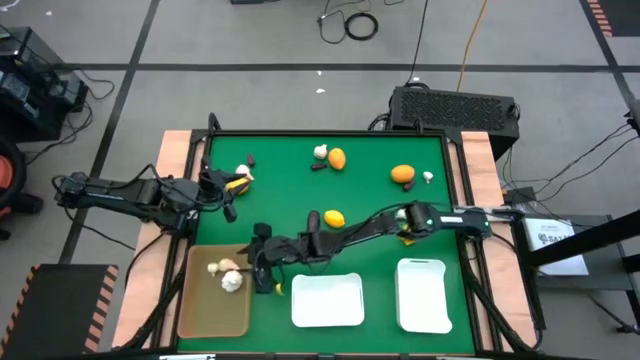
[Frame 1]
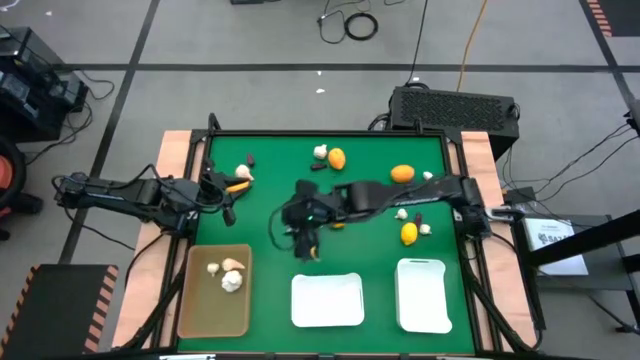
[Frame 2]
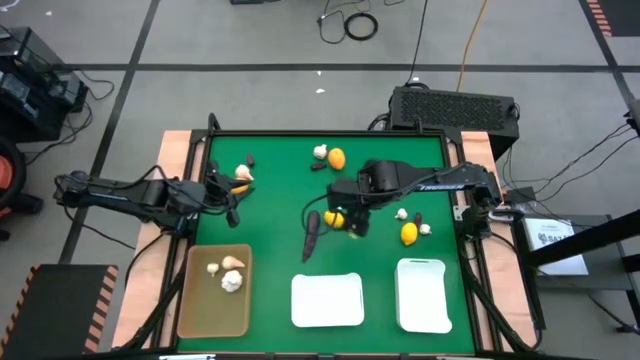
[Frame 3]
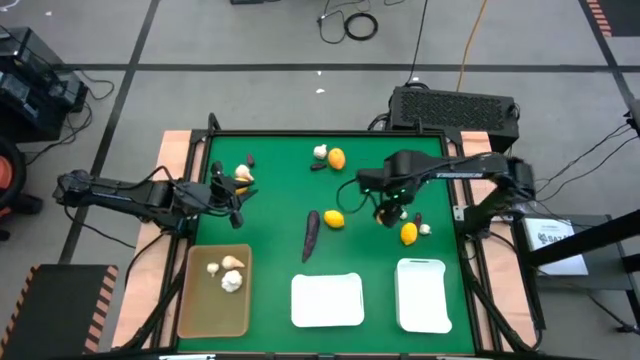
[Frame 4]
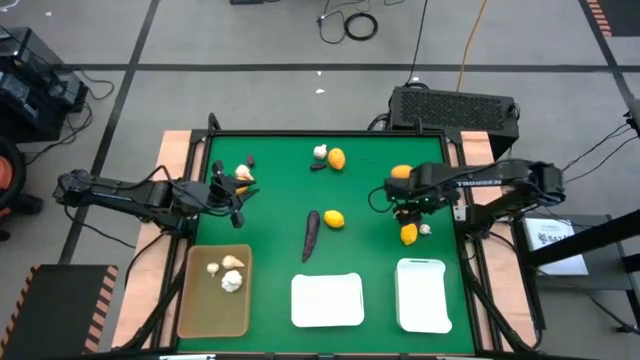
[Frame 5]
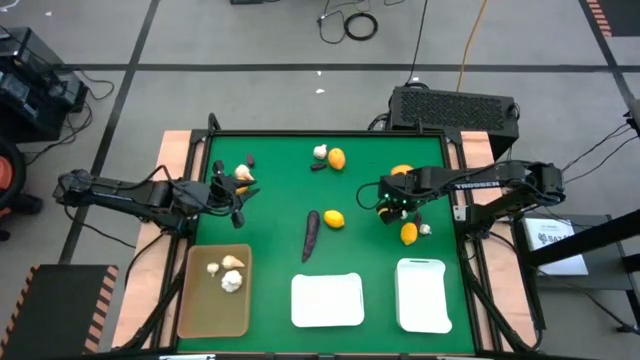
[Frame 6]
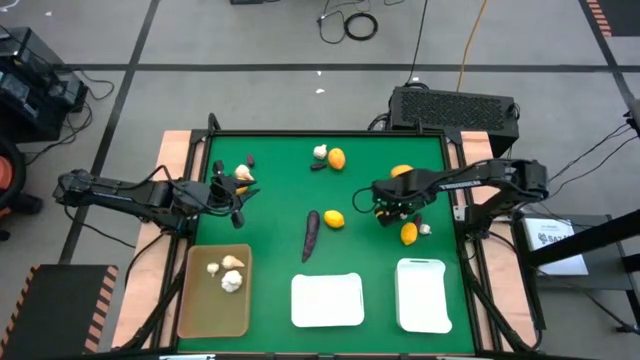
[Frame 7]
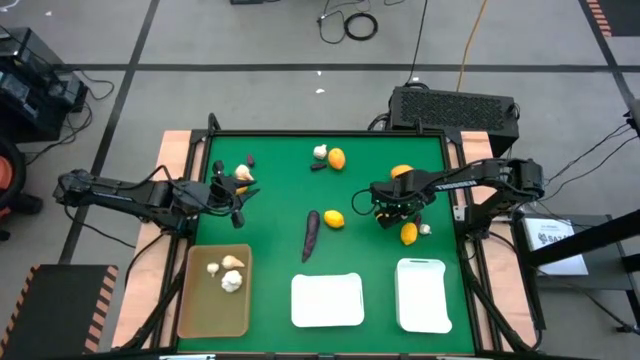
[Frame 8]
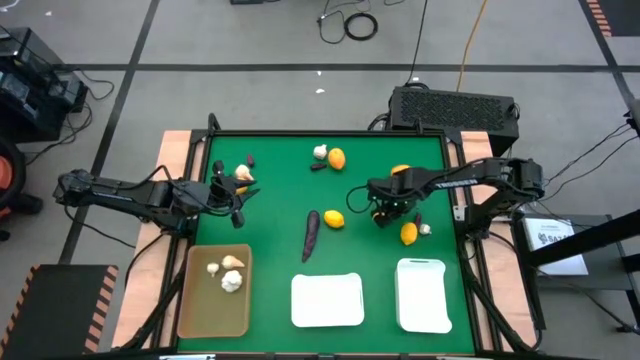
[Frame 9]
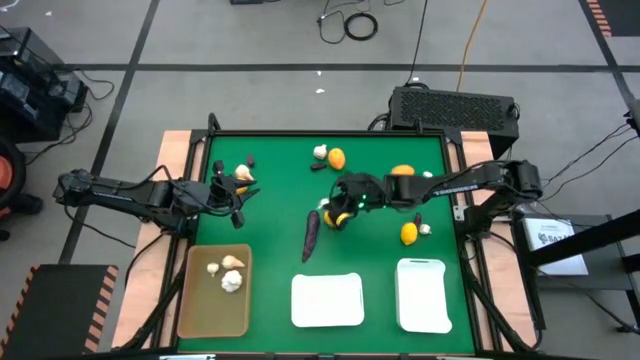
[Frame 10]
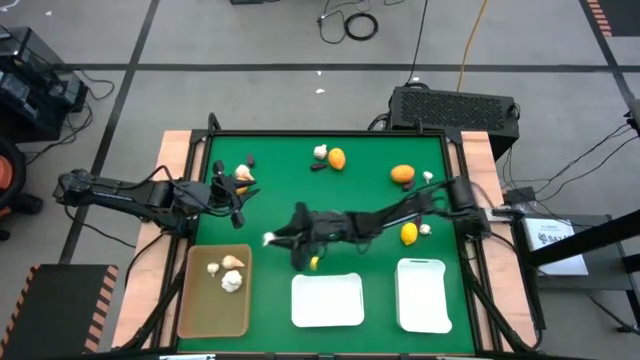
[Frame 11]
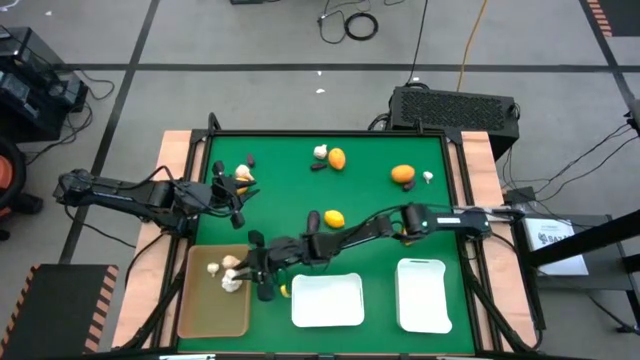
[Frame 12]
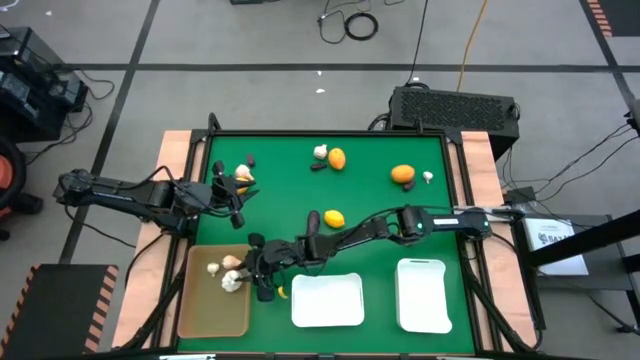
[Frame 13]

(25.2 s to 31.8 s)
Task: Sort produce into baskets
Put the garlic into the orange bin

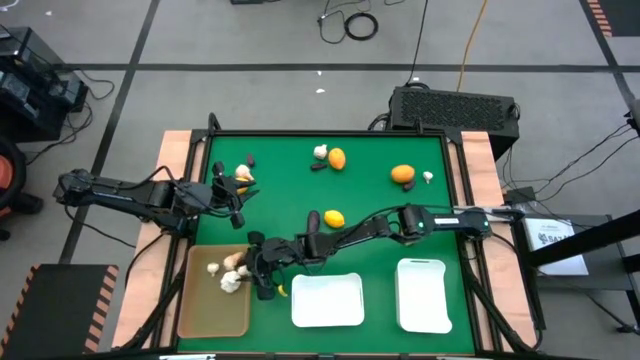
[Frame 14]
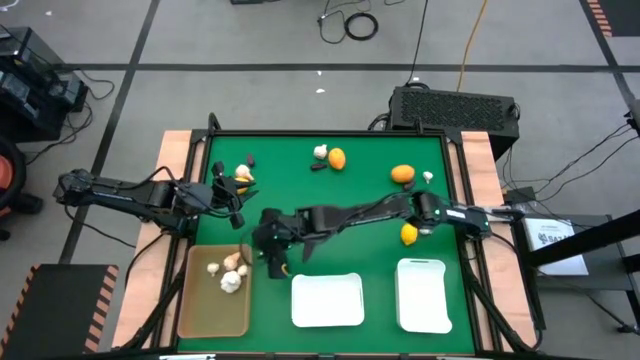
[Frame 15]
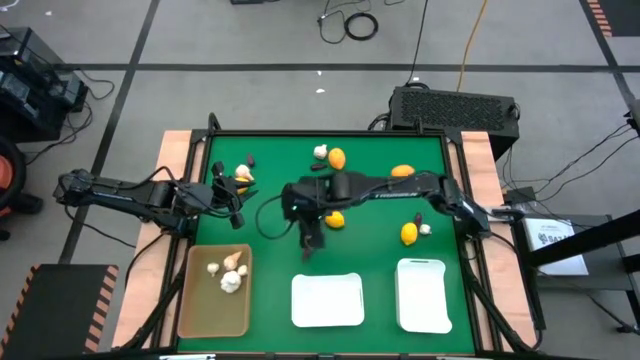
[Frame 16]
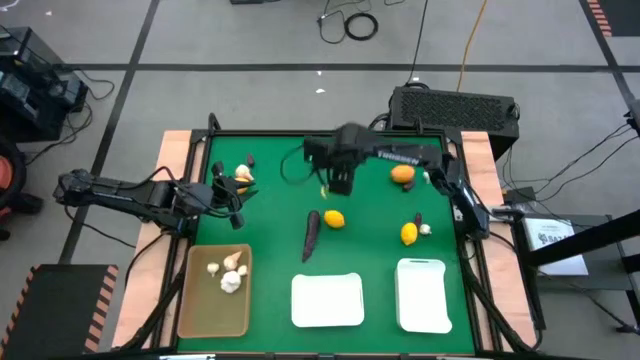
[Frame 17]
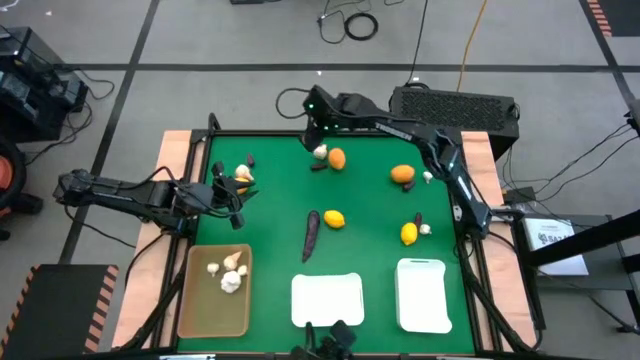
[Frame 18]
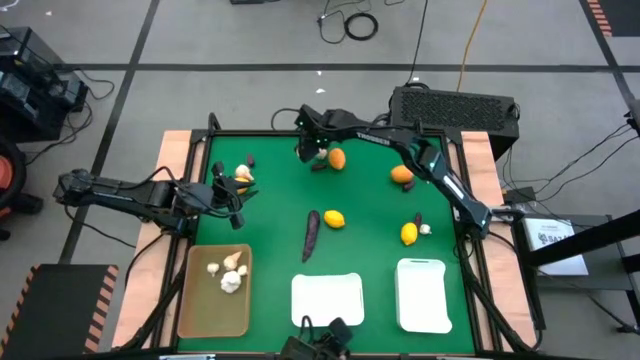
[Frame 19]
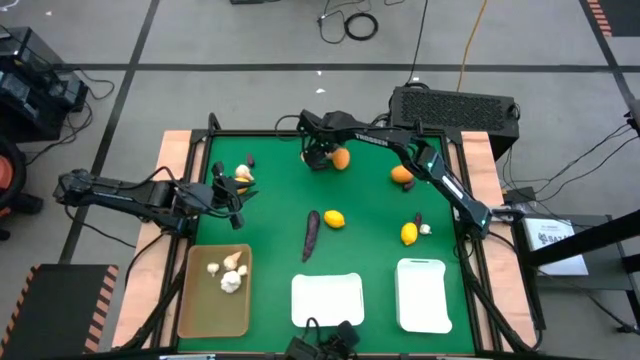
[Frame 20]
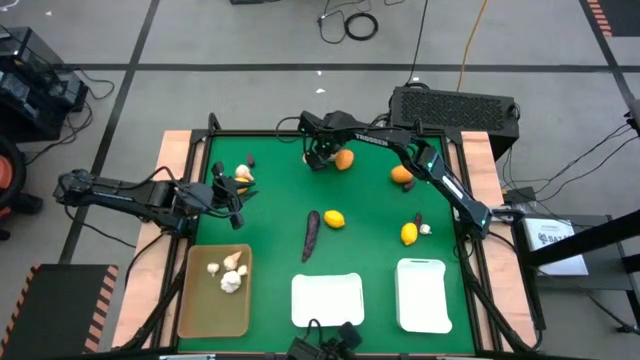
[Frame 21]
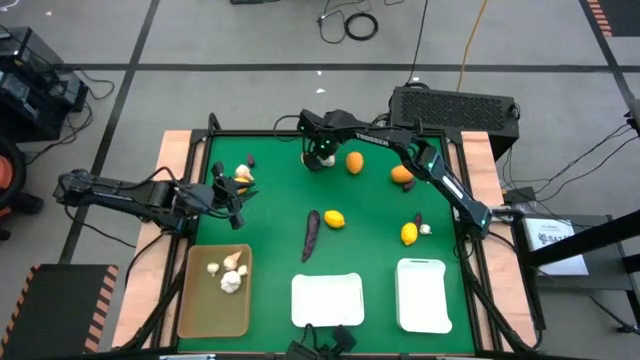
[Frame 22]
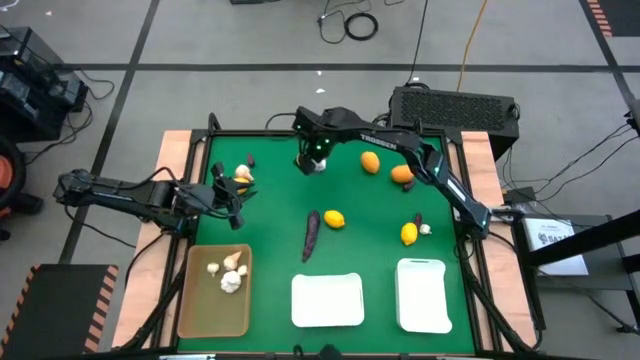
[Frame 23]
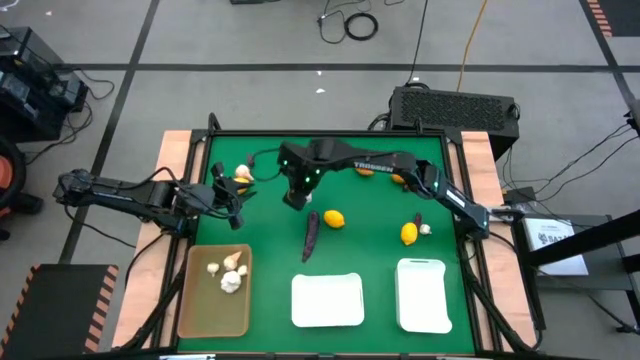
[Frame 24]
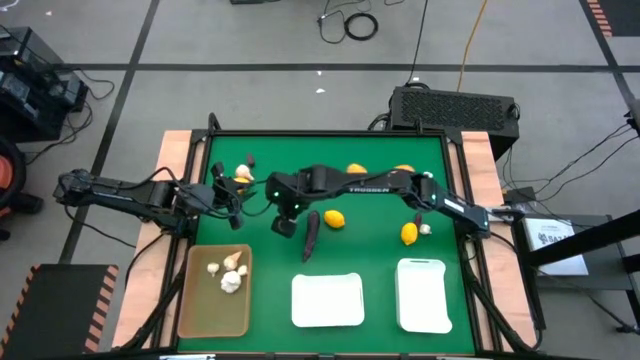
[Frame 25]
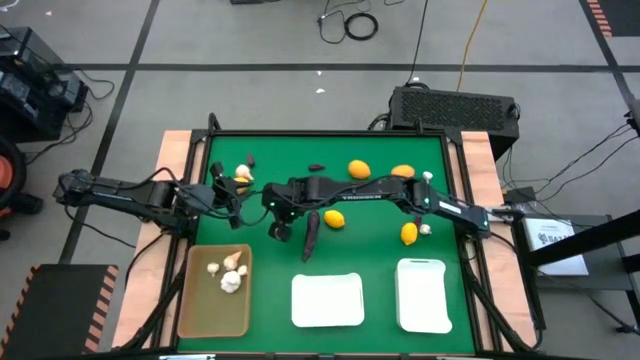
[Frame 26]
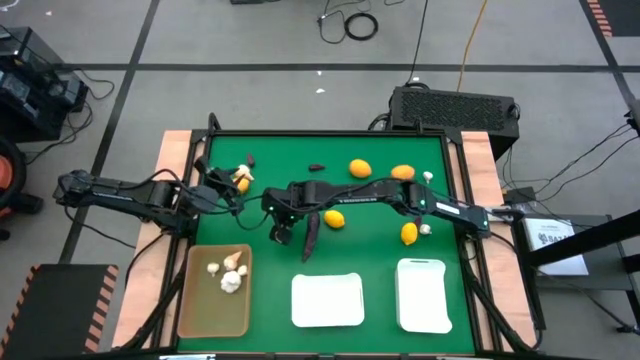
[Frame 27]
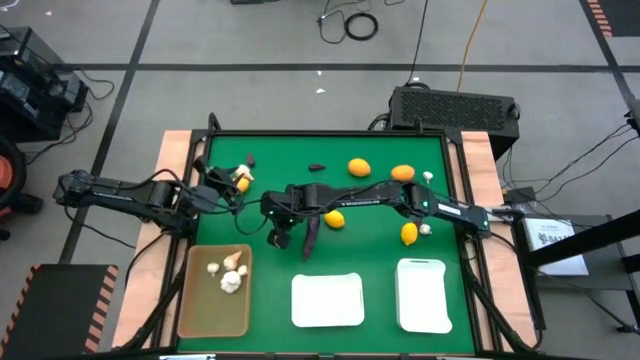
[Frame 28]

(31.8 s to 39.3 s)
Put the garlic into the orange bin

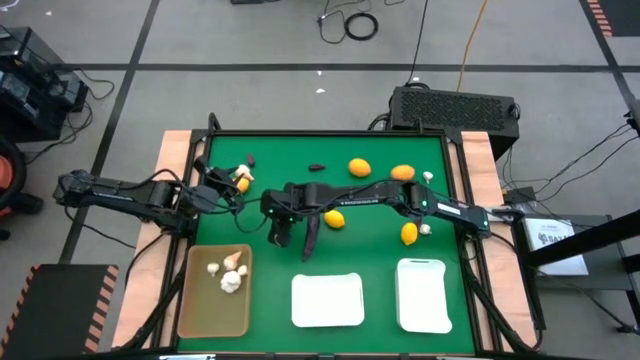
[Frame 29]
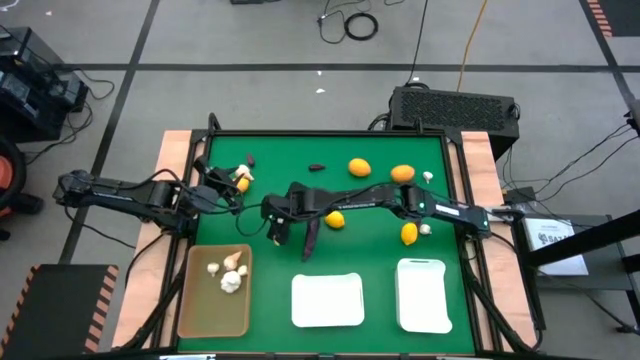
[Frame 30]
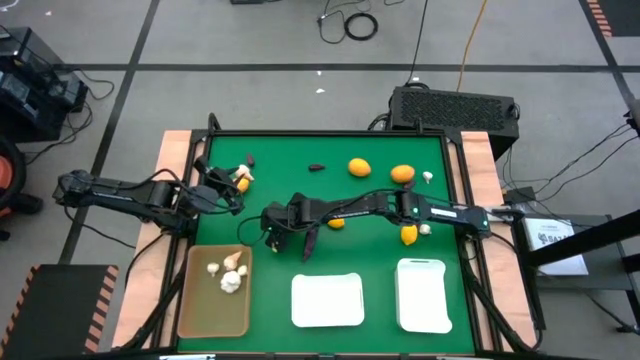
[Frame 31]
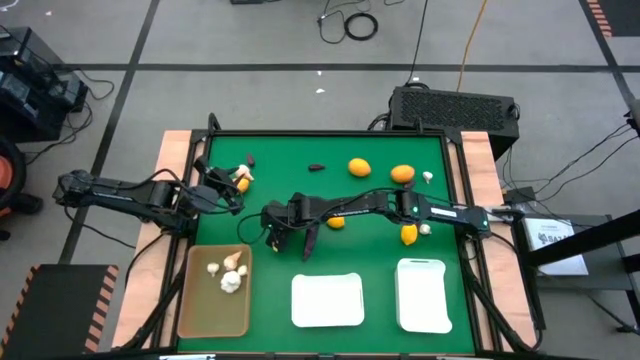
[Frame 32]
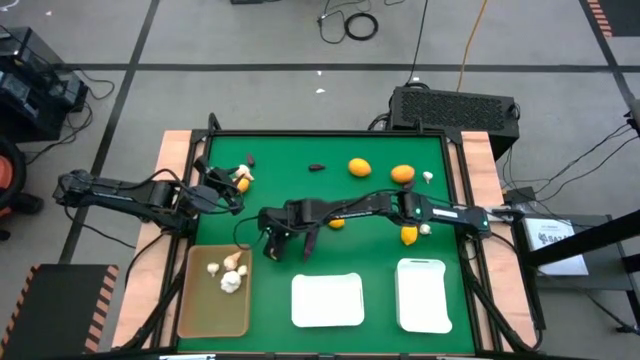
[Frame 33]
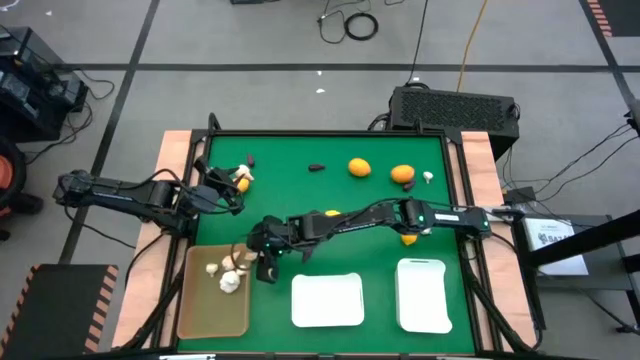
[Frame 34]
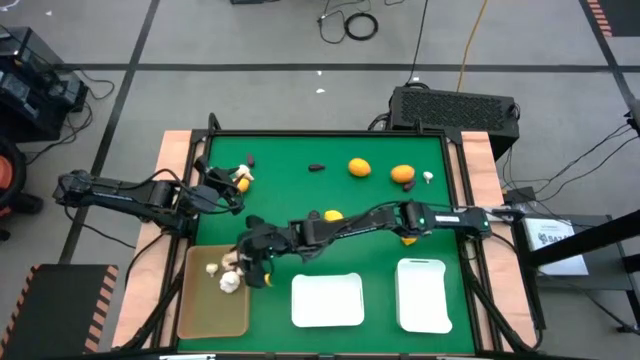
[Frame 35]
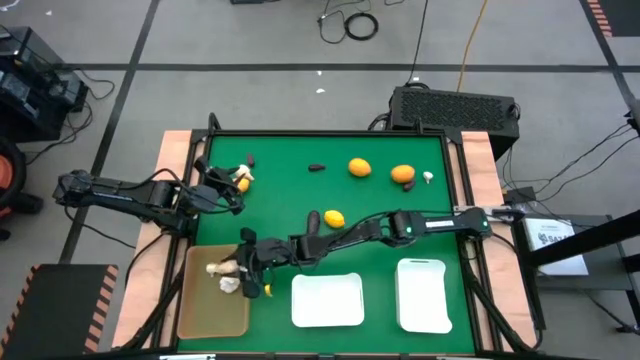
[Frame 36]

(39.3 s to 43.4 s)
Put the garlic into the orange bin

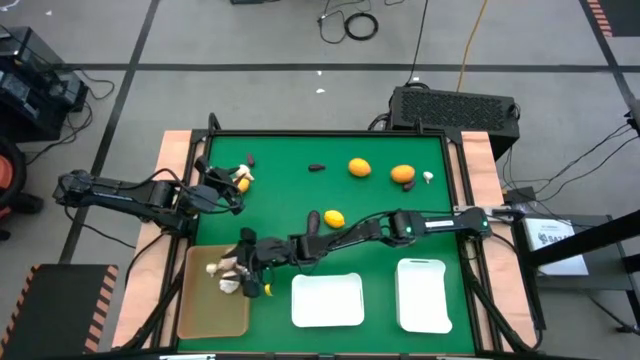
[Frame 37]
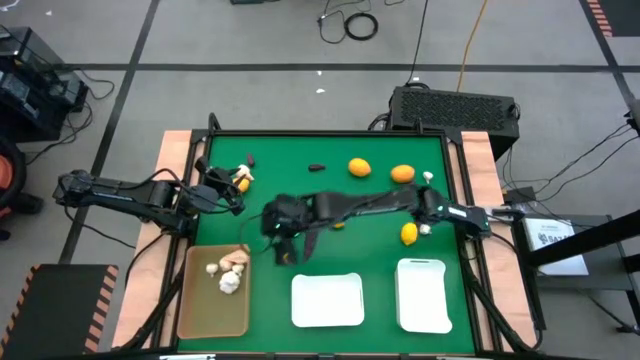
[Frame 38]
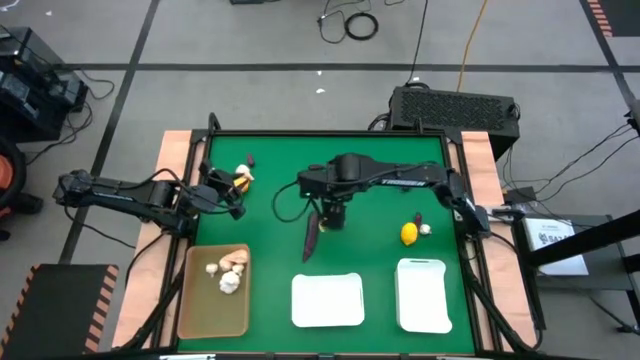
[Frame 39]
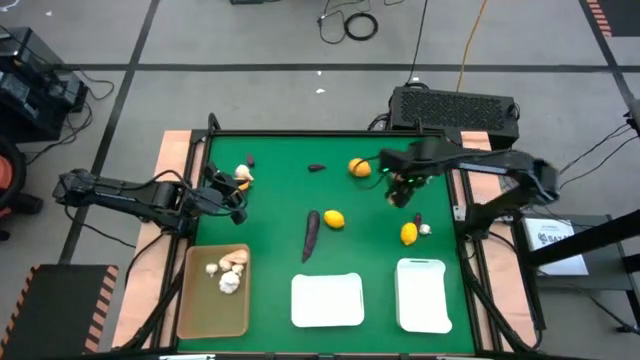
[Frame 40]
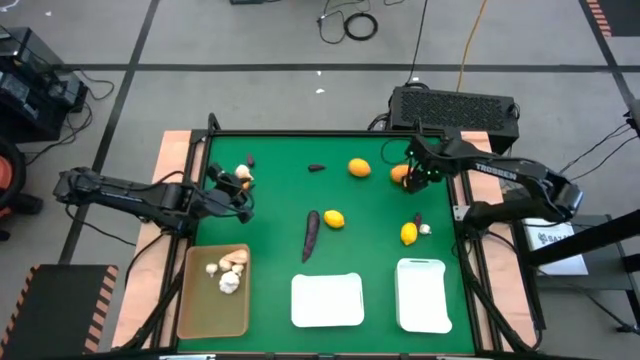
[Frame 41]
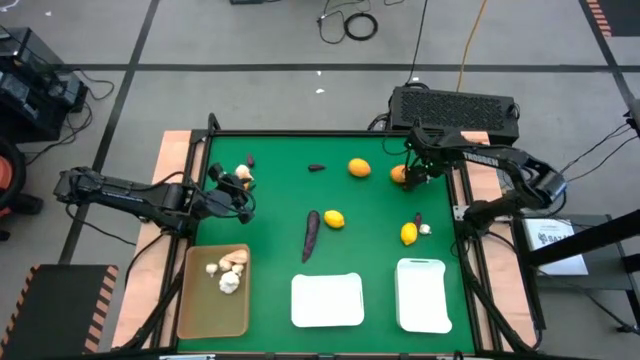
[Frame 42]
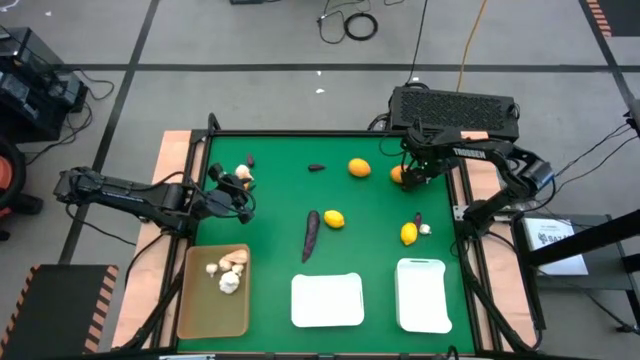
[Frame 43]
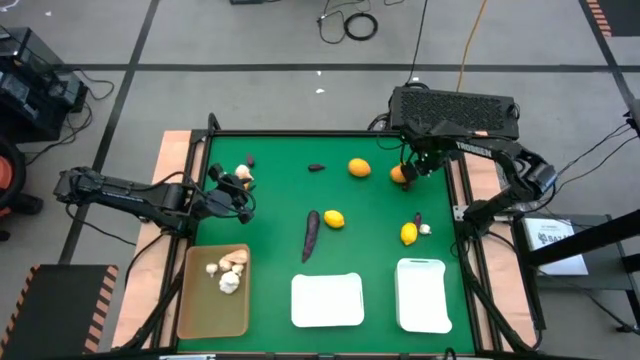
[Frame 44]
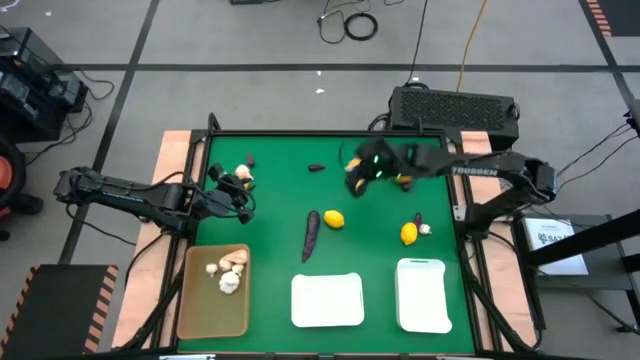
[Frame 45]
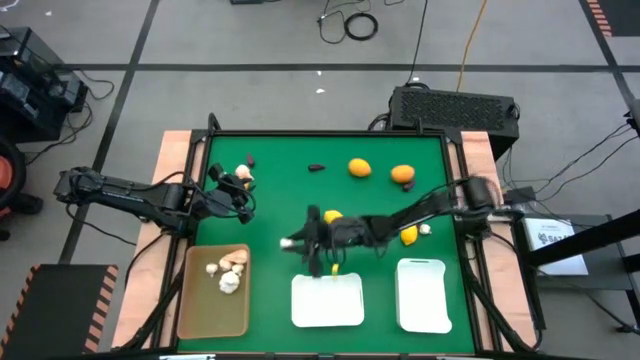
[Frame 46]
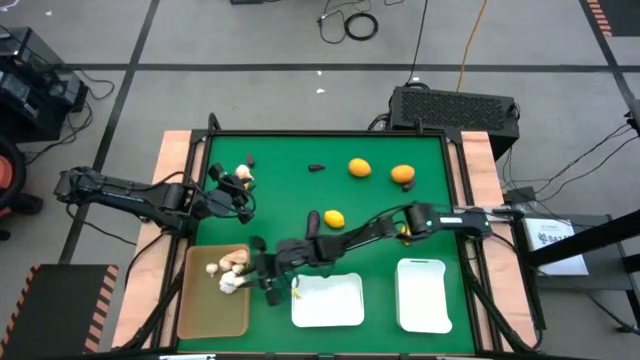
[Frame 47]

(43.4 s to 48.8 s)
Put the garlic into the orange bin
